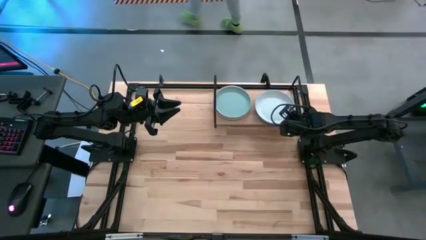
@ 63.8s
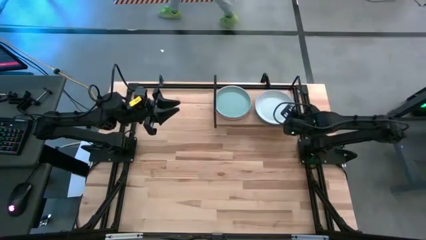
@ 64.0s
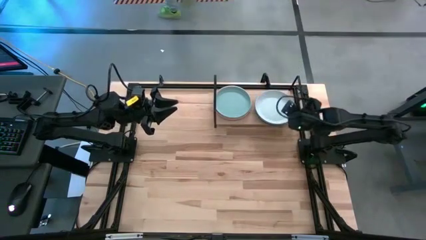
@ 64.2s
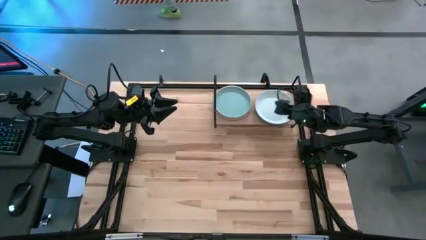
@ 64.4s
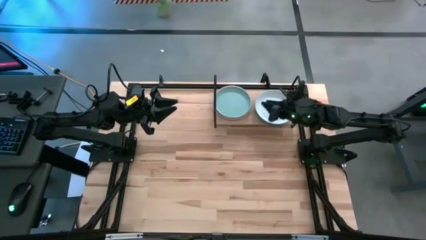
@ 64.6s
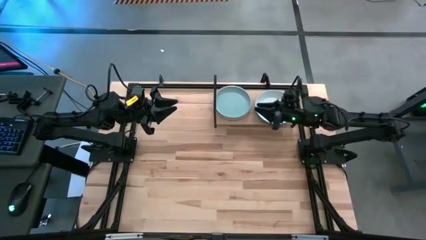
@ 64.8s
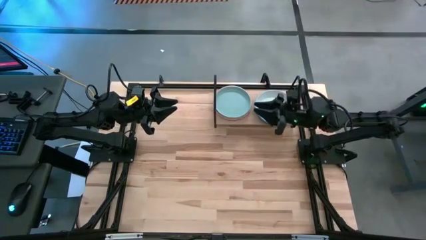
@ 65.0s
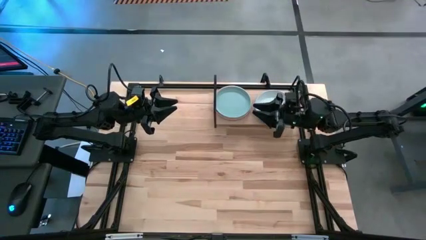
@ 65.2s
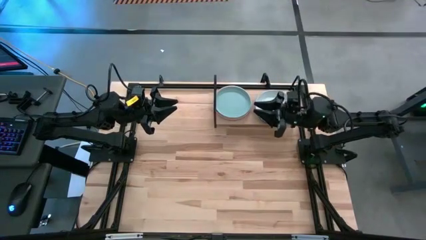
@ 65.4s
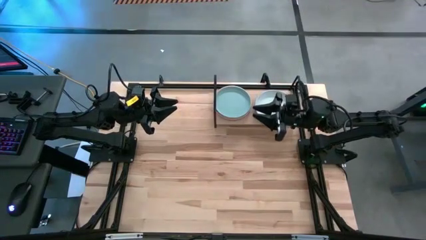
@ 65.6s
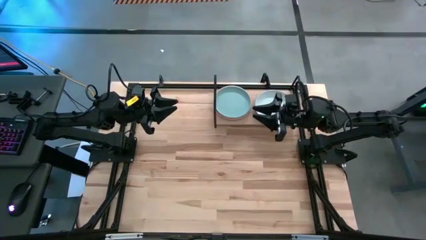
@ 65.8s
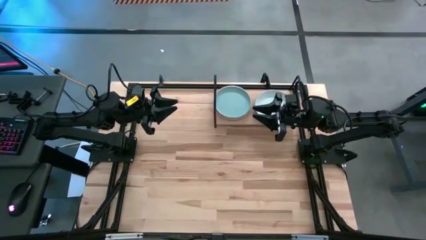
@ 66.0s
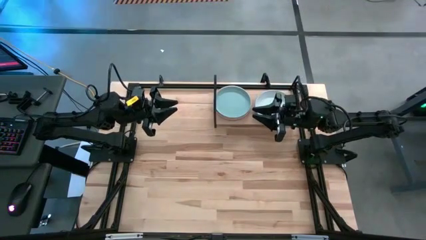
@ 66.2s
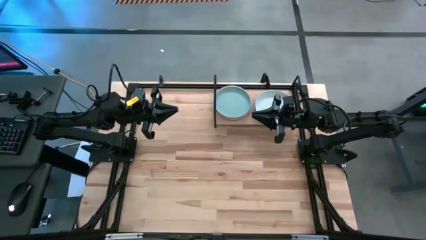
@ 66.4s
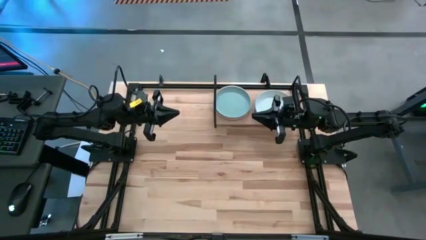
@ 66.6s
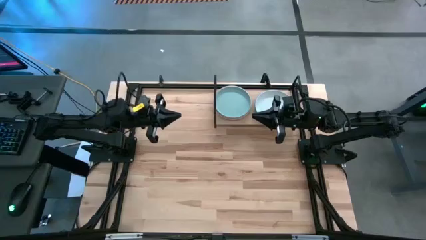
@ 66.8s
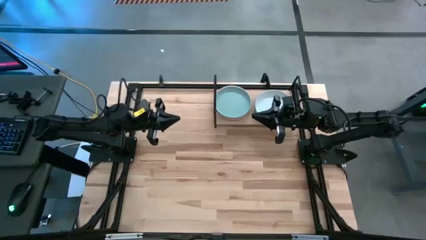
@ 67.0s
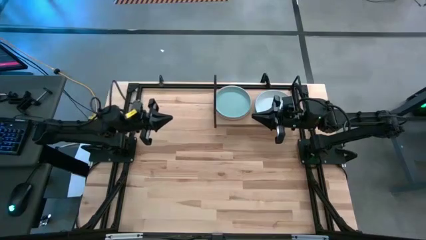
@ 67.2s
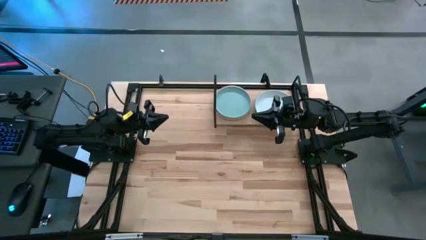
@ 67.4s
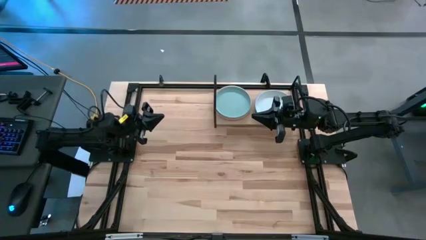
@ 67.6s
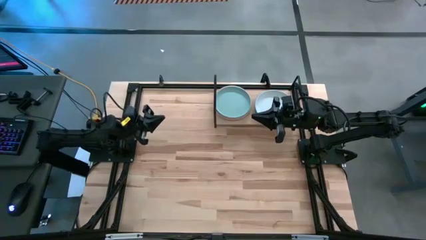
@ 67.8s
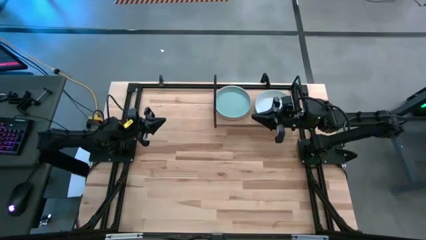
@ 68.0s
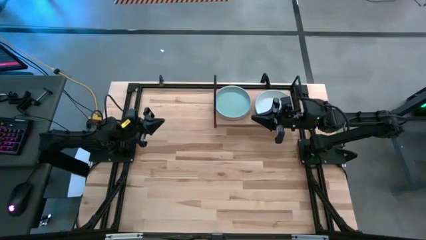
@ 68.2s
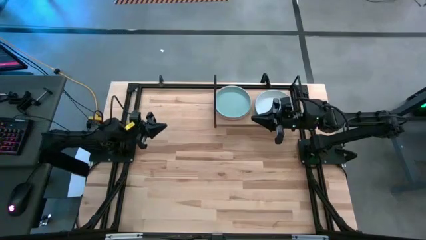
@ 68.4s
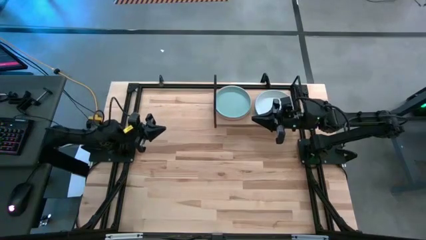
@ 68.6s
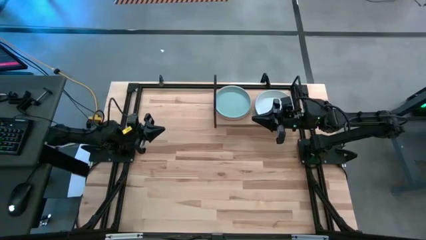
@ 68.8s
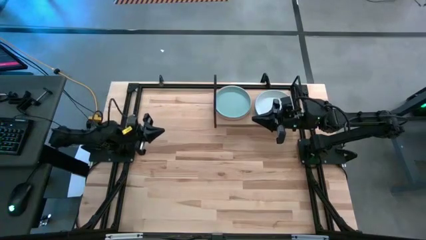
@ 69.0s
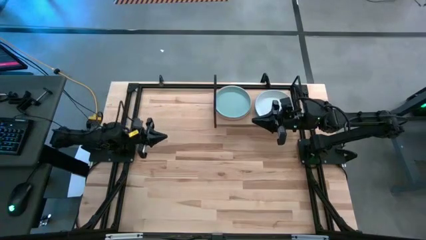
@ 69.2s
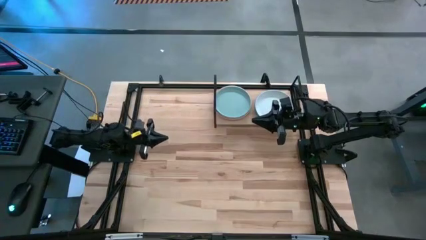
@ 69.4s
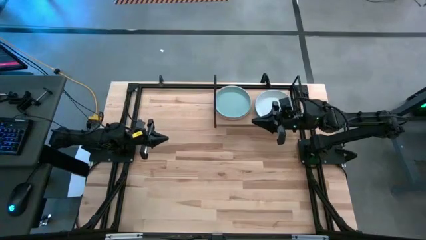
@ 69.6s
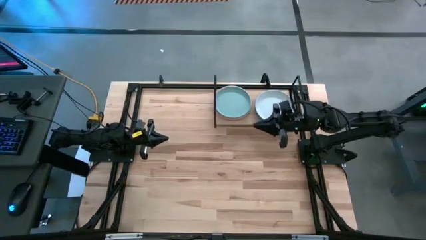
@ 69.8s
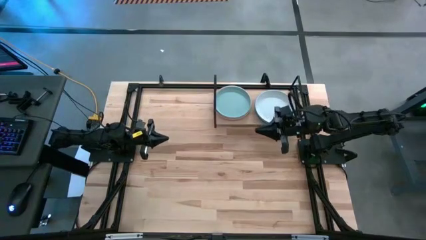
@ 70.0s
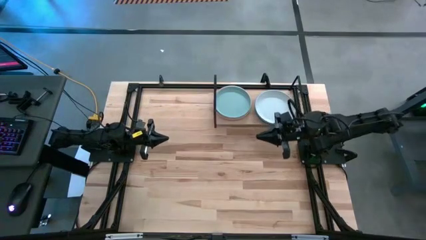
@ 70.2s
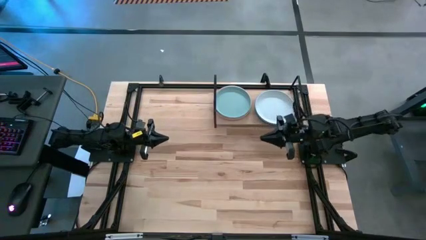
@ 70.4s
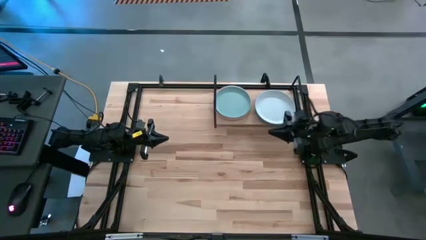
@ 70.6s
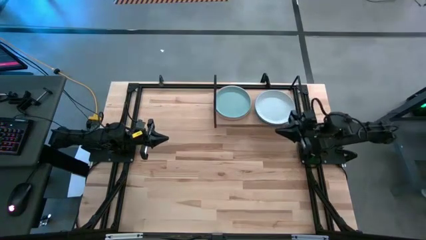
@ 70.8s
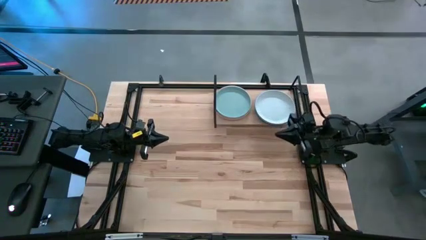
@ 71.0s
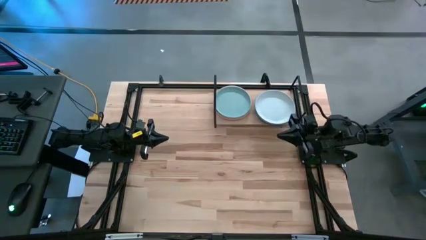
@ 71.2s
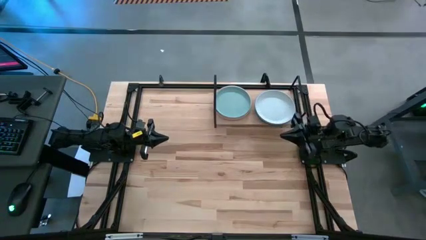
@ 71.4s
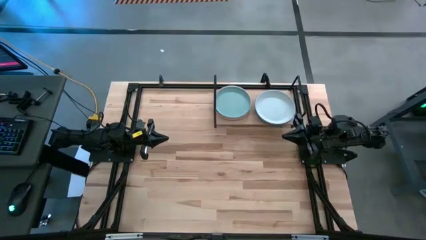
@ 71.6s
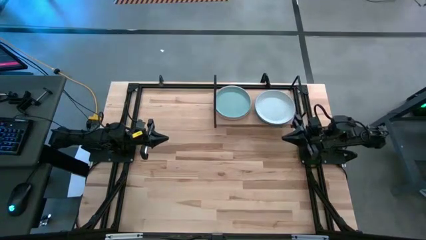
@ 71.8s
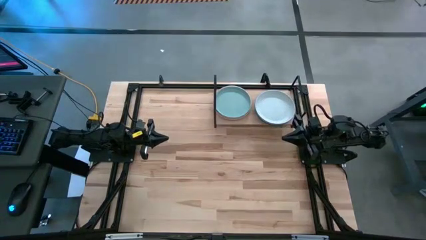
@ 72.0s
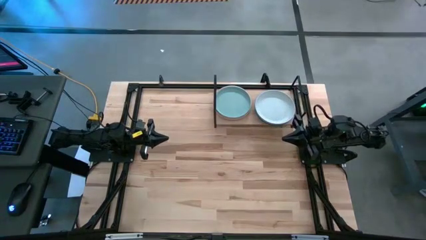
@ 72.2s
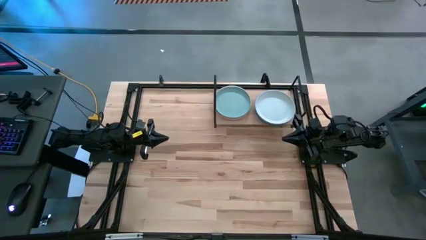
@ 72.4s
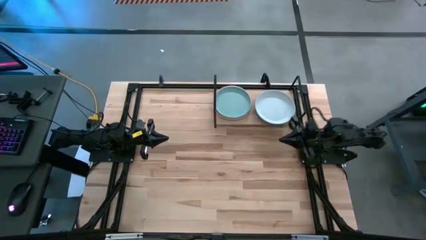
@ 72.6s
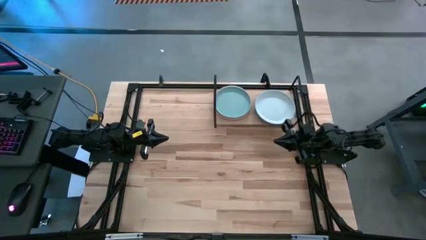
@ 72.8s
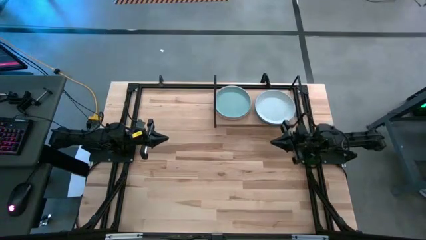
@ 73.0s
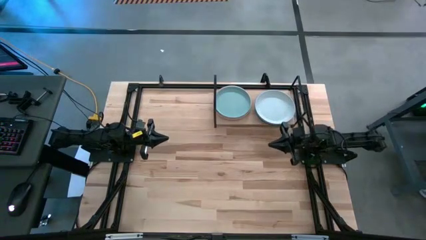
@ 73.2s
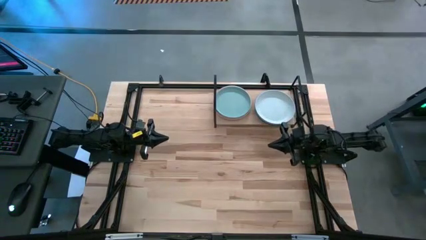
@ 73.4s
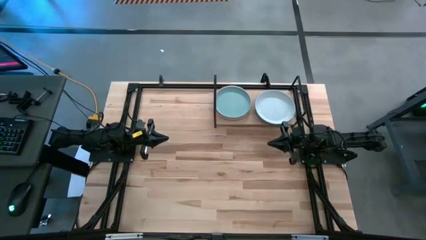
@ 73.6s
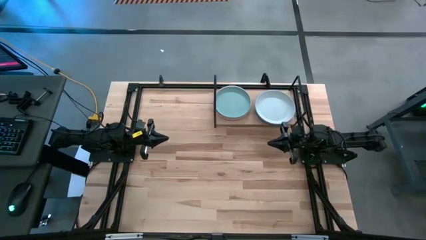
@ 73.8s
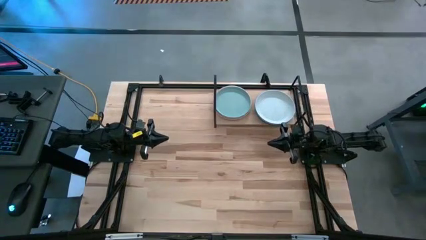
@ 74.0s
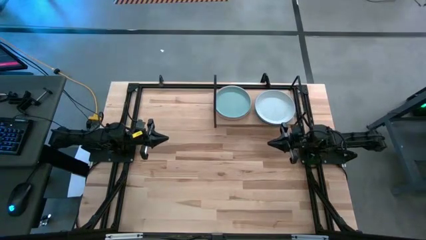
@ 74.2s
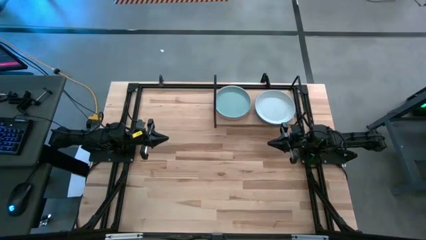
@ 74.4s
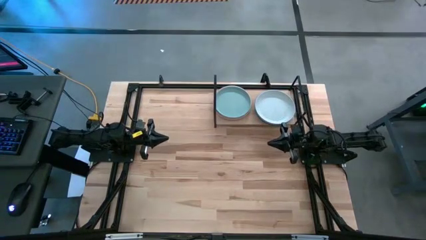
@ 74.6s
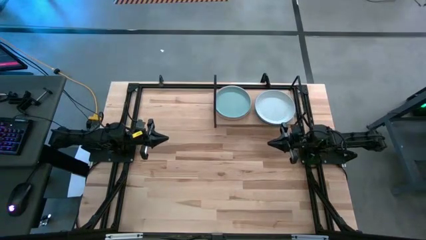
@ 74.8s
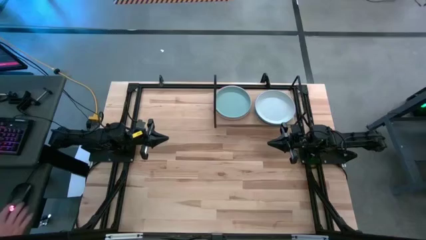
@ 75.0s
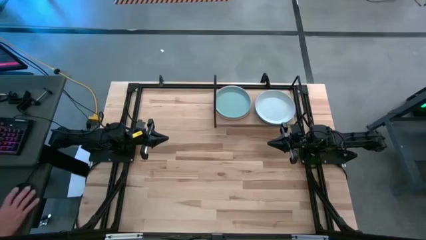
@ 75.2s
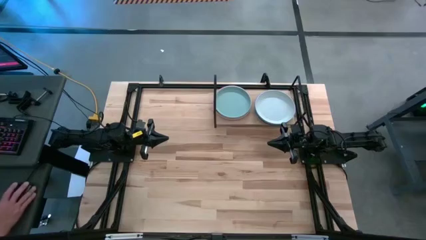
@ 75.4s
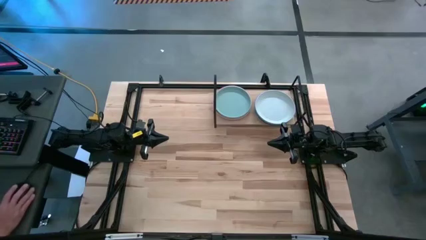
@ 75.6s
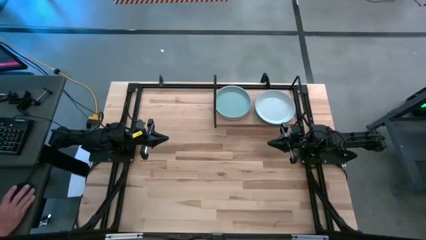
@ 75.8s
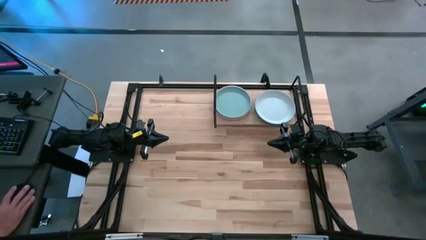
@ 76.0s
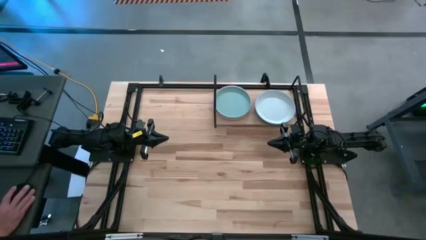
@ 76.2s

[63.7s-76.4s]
Task: Place and stack plates onto a shelf
Return to Home Position

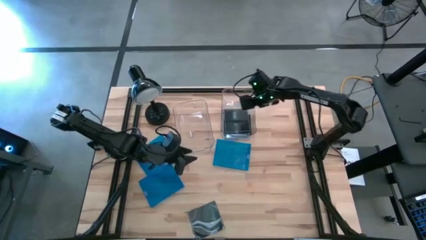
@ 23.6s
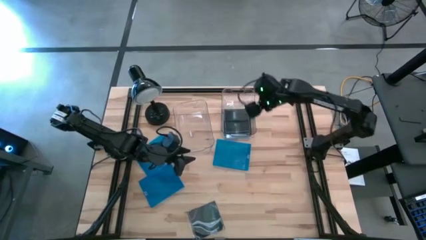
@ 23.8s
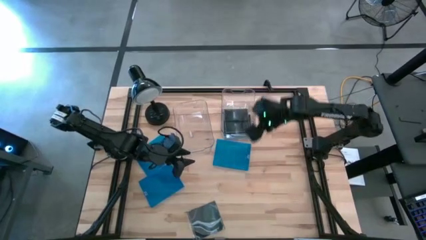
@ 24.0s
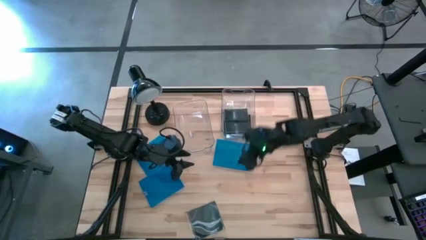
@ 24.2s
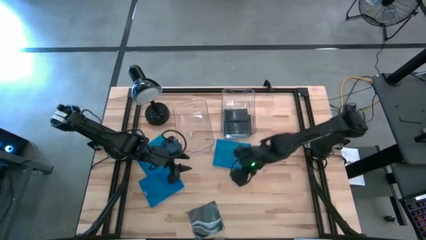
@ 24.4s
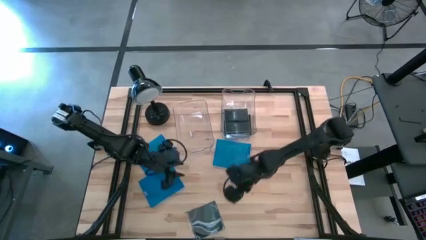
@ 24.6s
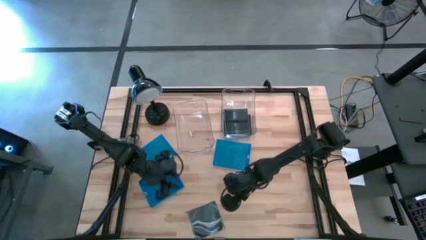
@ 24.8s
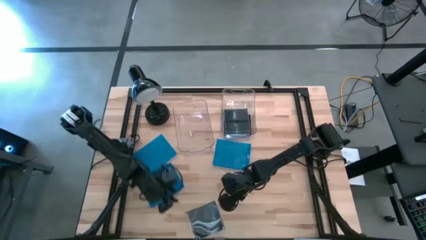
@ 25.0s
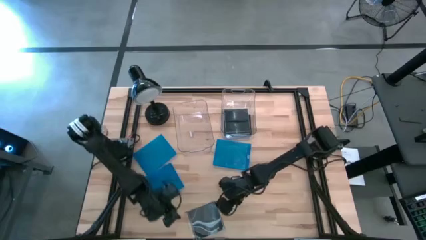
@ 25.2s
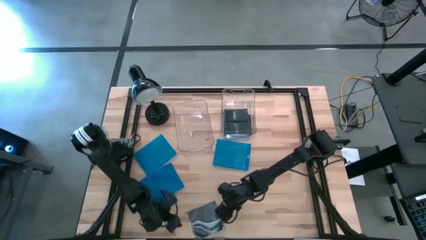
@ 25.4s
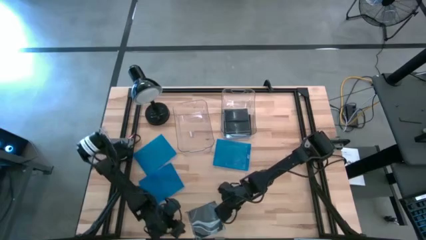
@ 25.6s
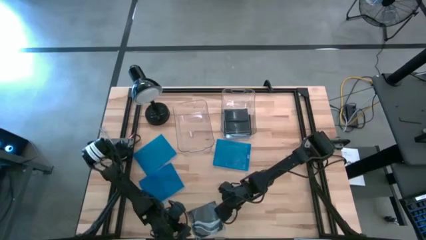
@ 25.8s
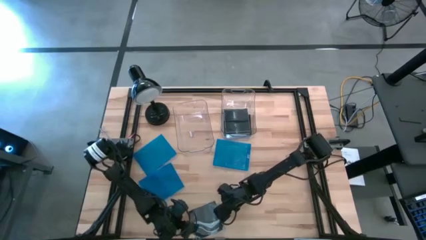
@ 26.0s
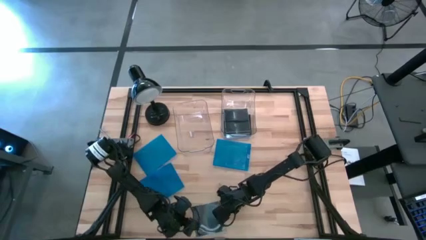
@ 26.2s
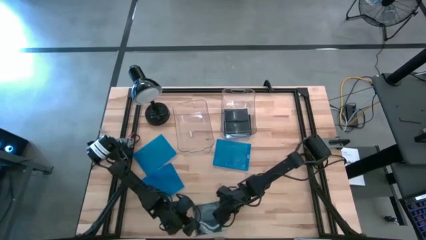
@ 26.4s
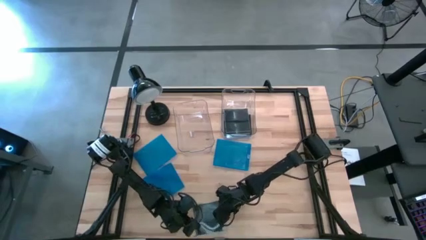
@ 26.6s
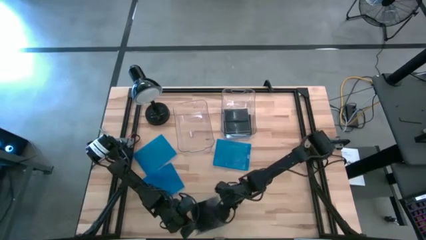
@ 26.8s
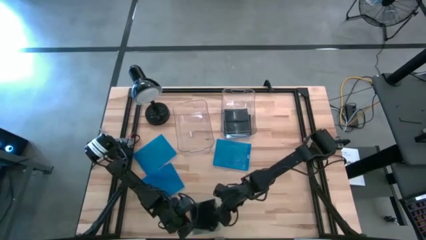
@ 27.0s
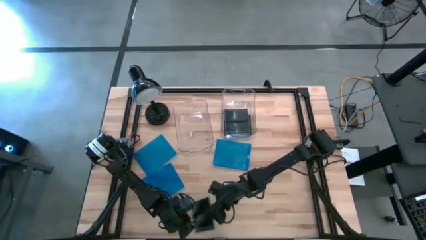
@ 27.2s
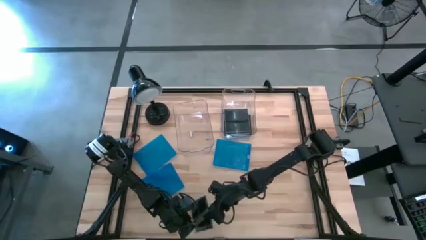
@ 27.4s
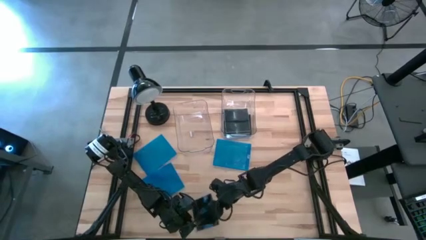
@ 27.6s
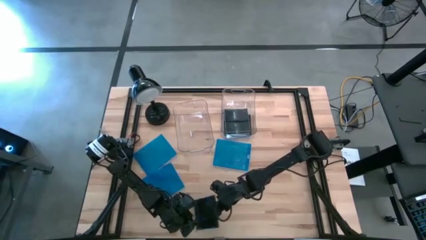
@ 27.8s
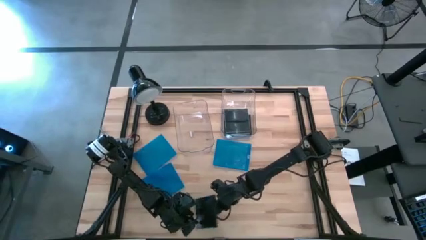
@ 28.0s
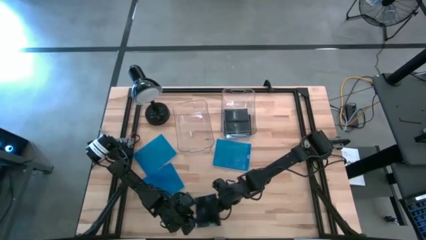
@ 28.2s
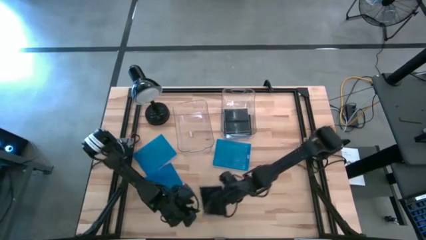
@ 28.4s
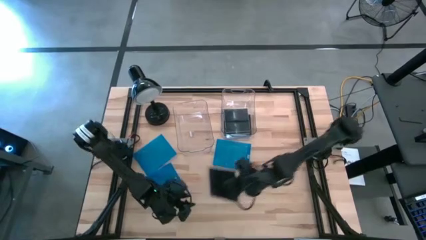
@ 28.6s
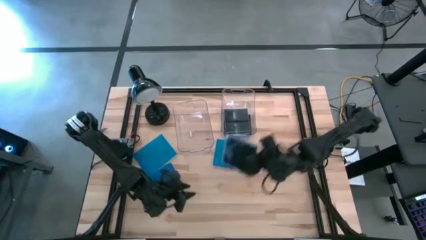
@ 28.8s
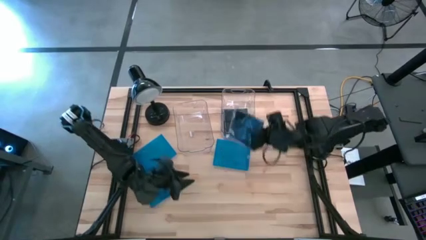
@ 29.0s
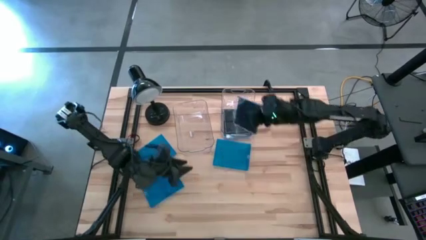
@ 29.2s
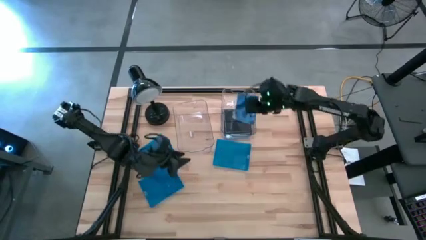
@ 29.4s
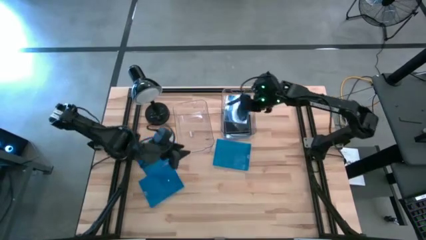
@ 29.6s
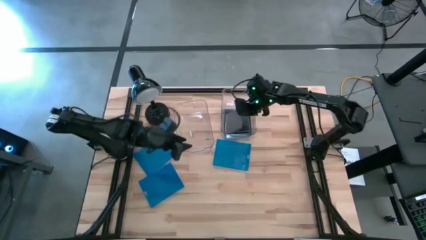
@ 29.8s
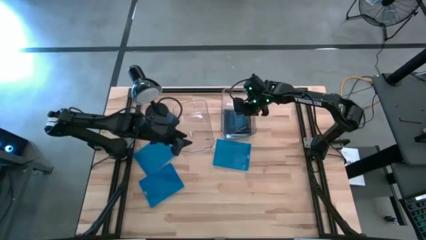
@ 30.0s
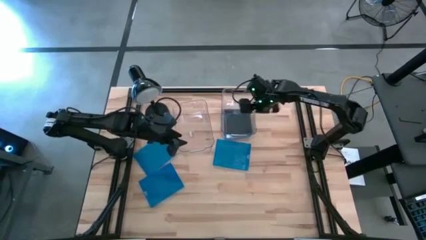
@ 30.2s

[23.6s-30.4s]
Task: Pick & place jewel cases by type
Put the black CD case into the right transparent bin
